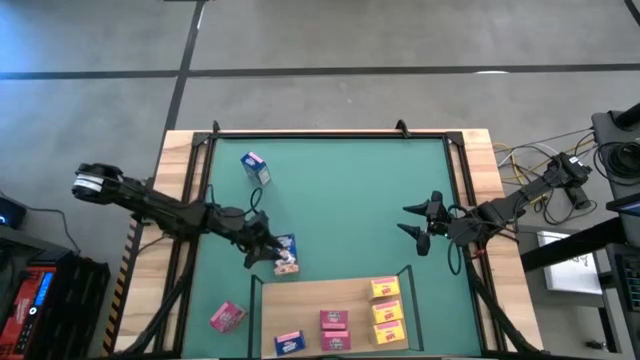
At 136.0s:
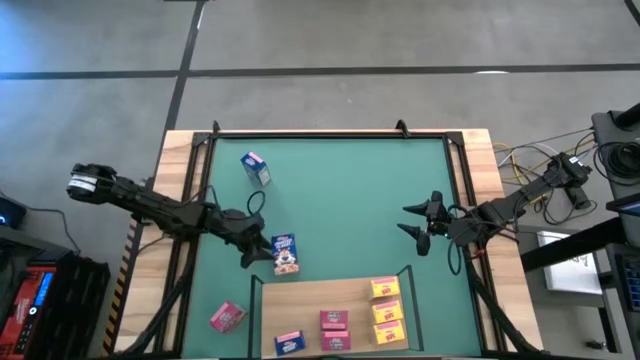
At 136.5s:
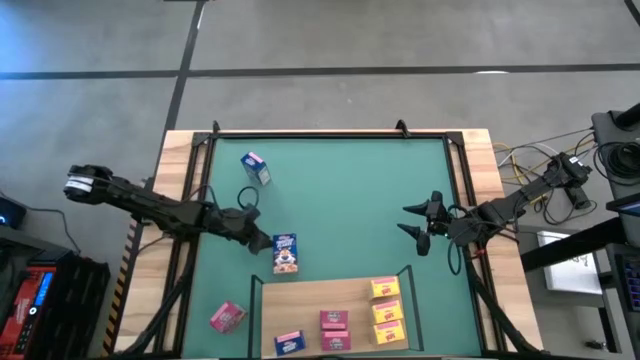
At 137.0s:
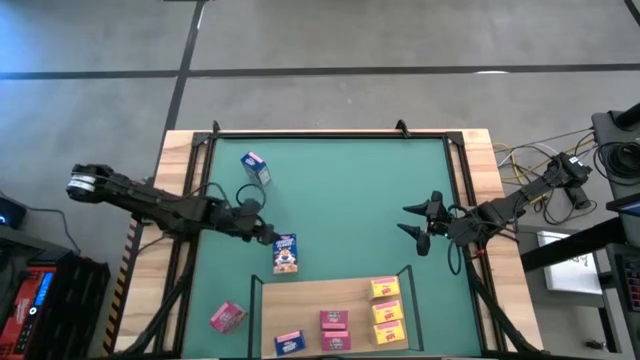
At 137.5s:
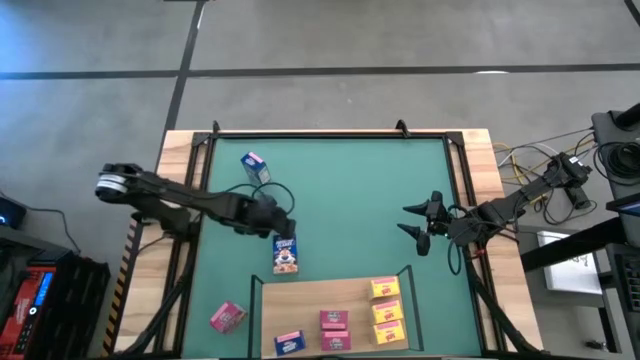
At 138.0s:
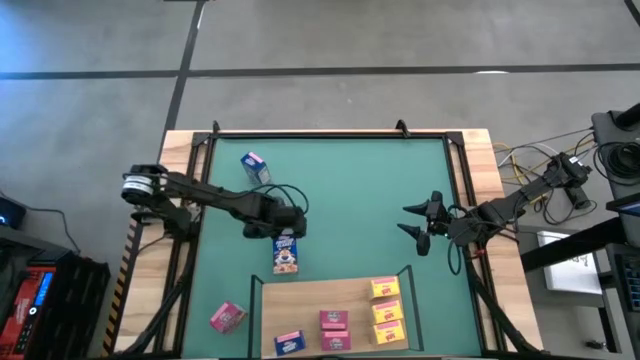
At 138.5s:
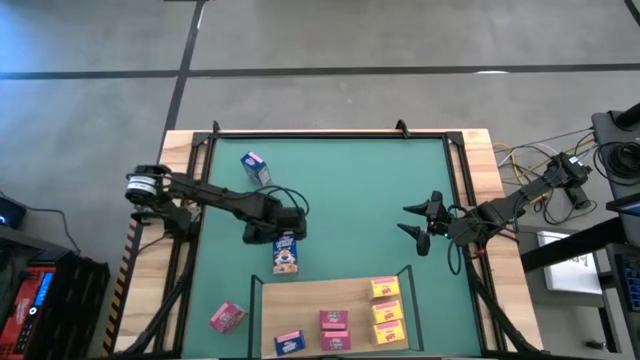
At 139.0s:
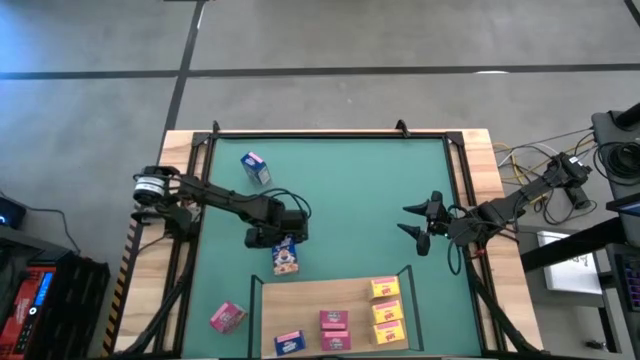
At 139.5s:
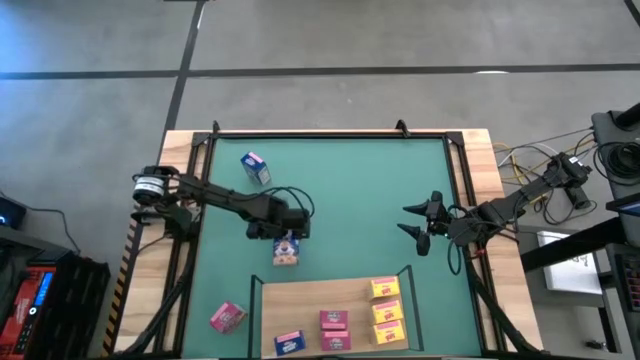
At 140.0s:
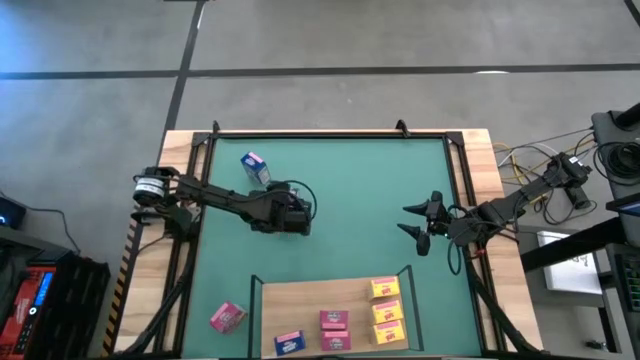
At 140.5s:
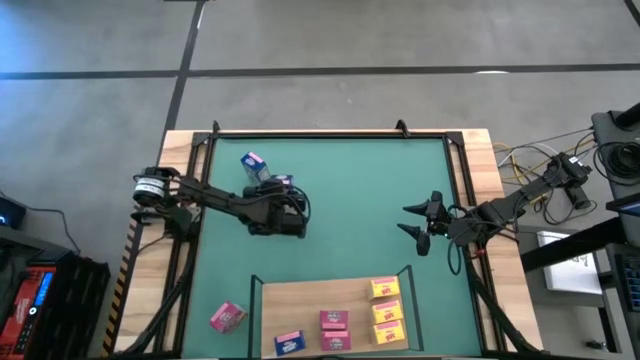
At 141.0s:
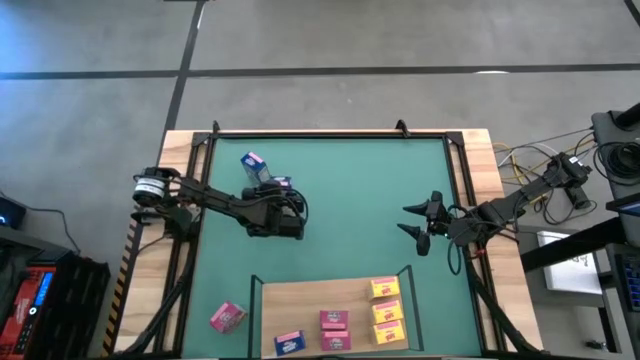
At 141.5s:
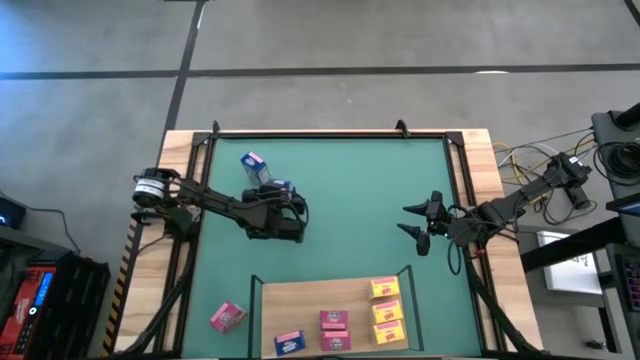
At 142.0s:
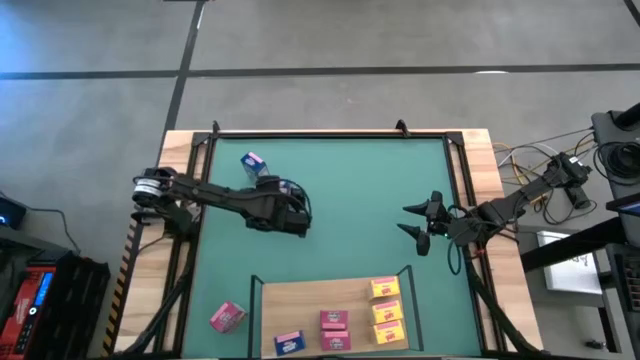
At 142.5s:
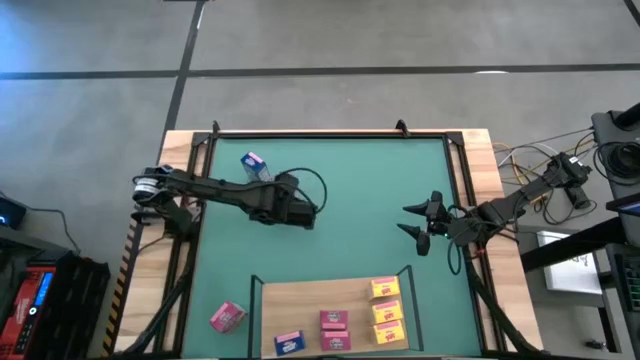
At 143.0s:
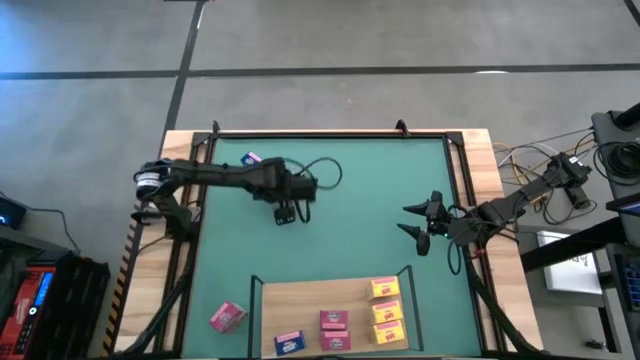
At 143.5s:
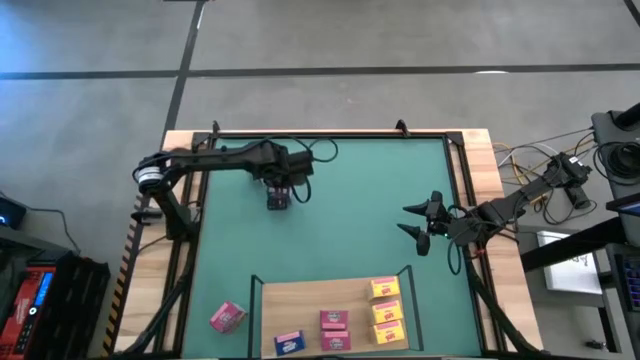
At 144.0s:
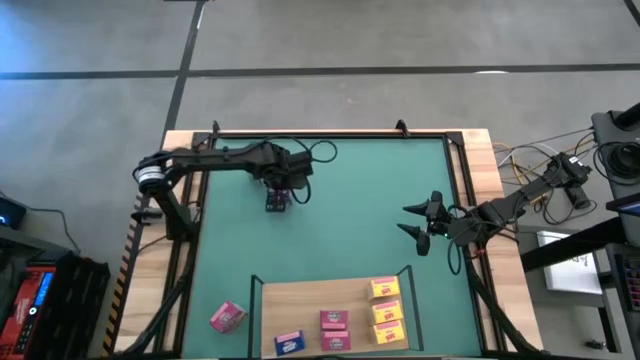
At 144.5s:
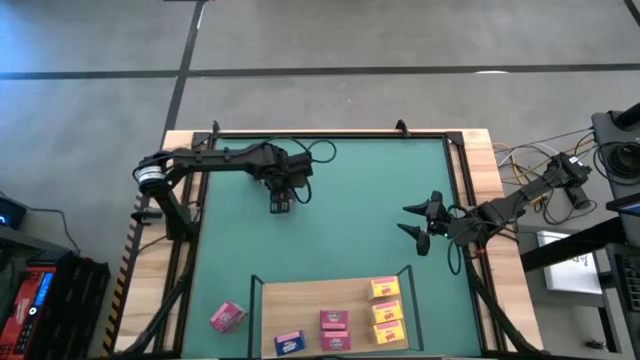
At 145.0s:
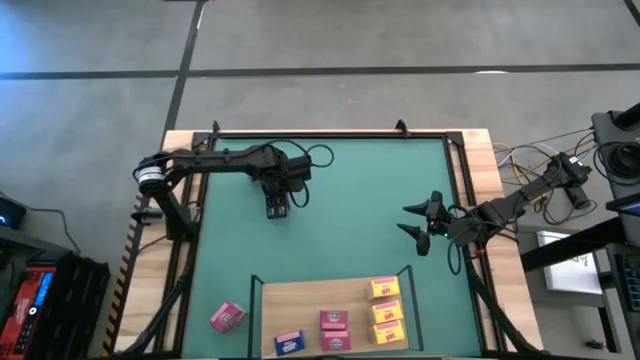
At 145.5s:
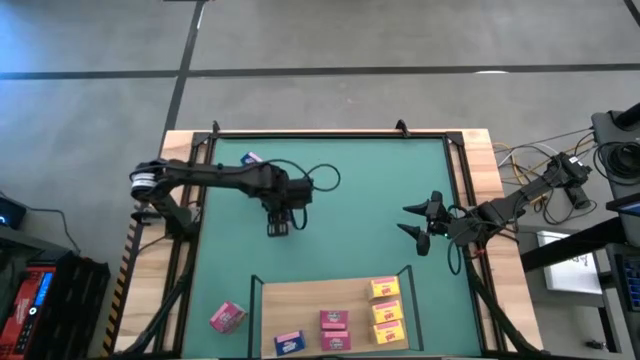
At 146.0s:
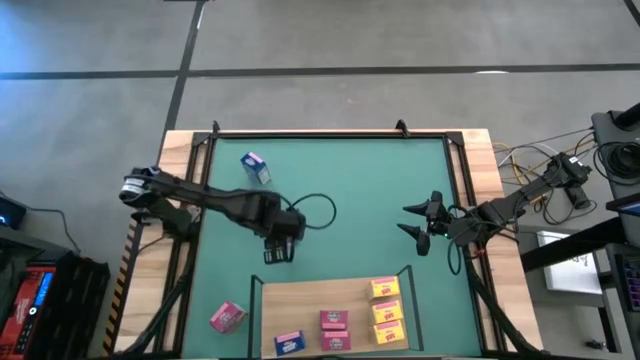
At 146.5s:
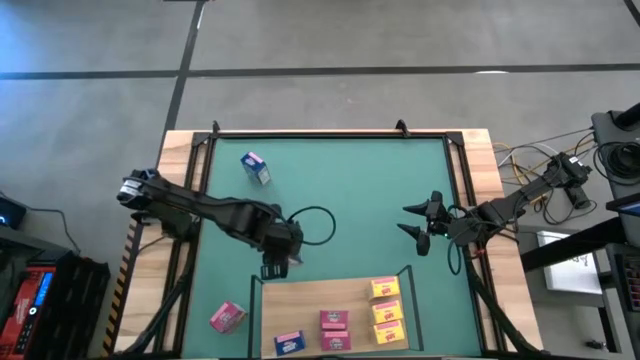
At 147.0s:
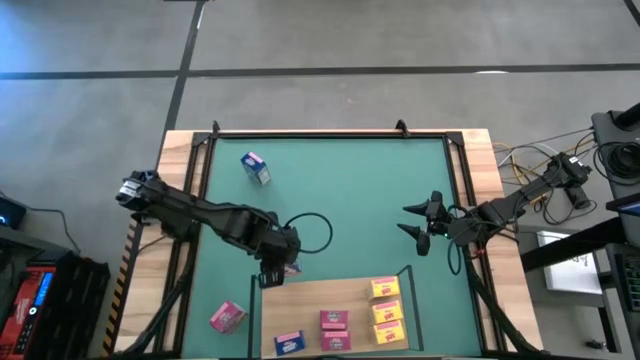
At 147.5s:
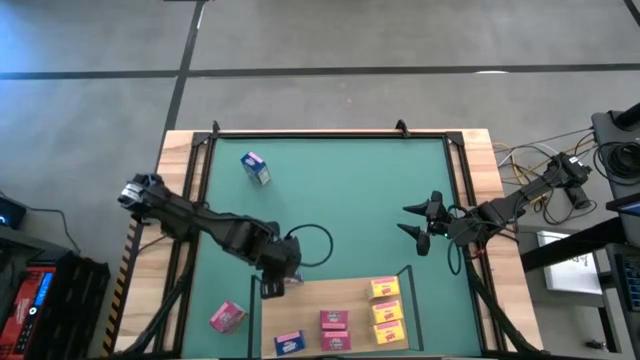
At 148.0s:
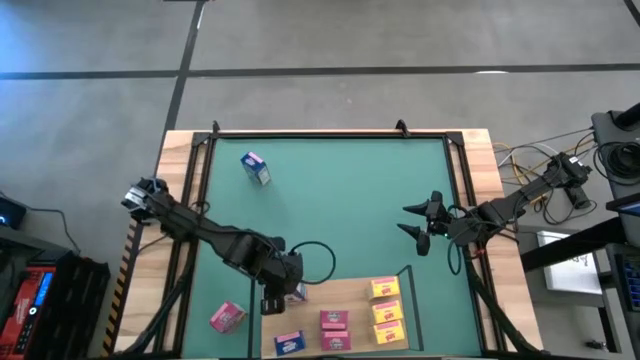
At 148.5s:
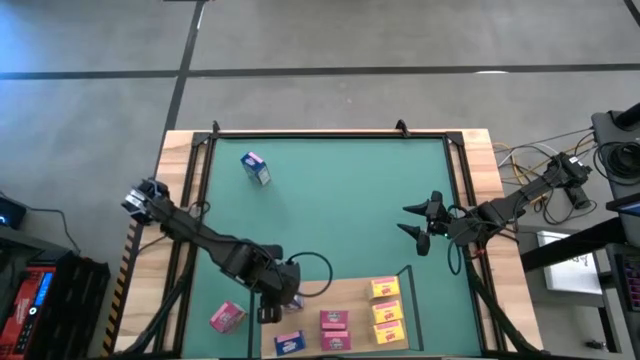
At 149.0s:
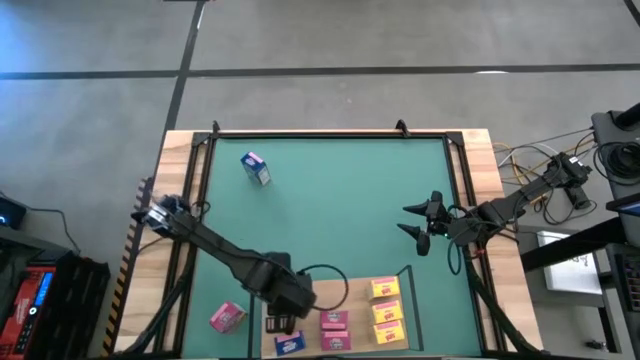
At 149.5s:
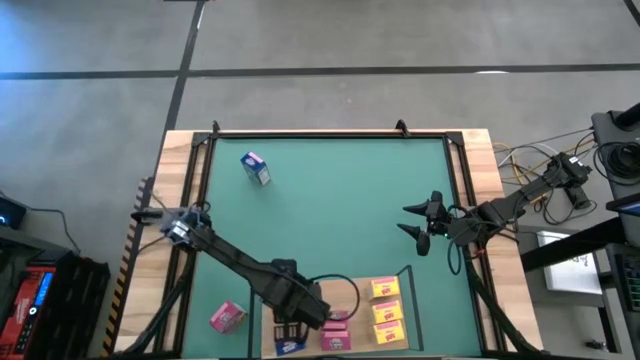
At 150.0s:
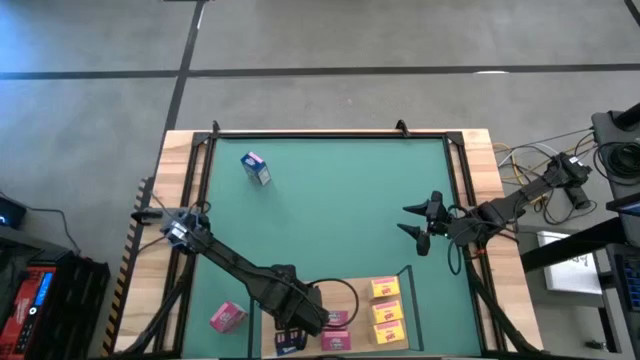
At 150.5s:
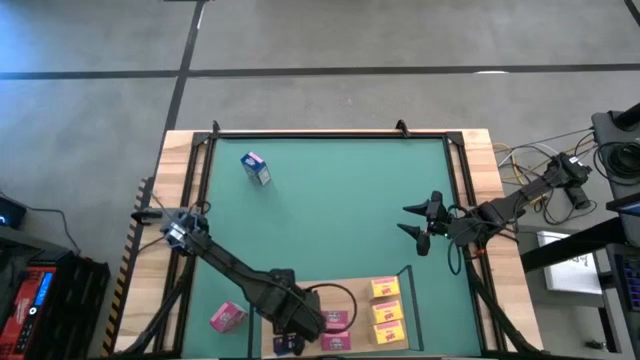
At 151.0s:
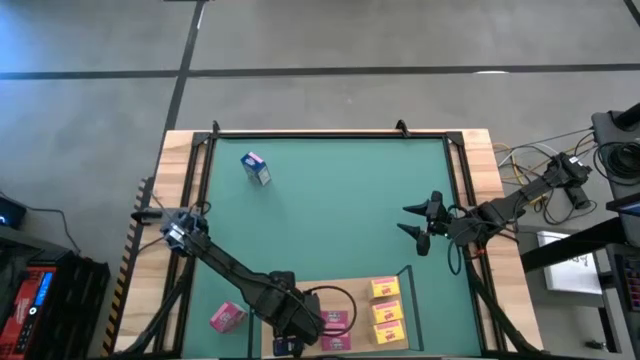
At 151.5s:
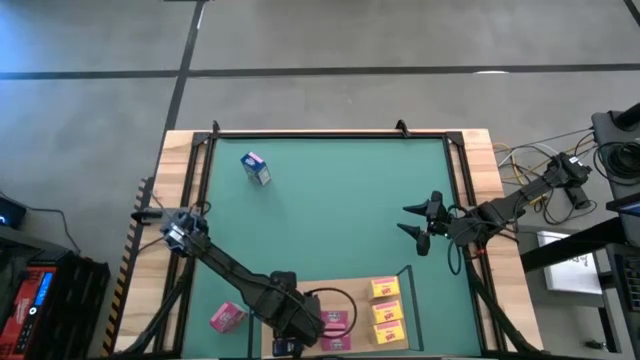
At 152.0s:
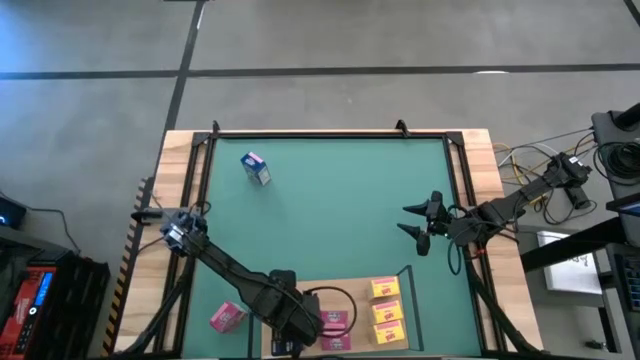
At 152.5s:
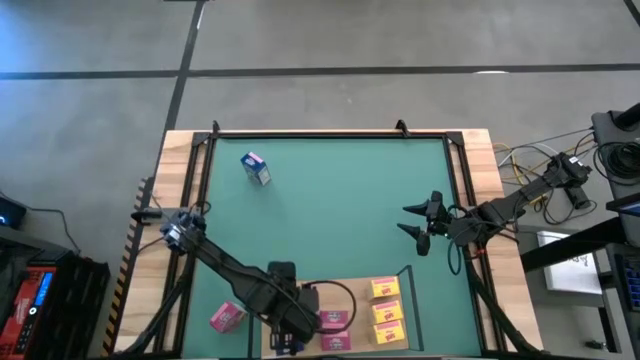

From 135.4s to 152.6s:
Task: Stack cereal on shelf
Put the bottom blue cereal box on the shelf aligned with the other blue cereal box

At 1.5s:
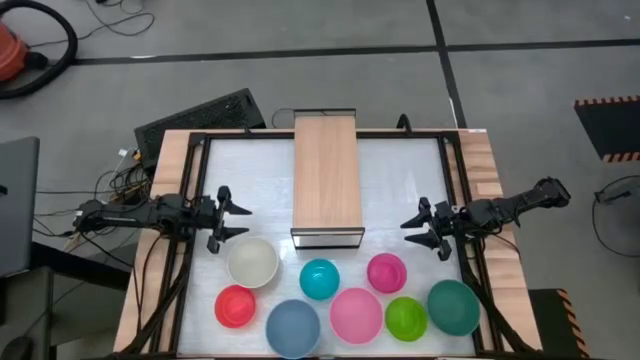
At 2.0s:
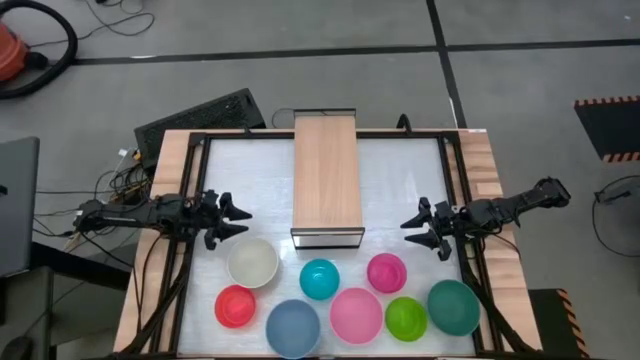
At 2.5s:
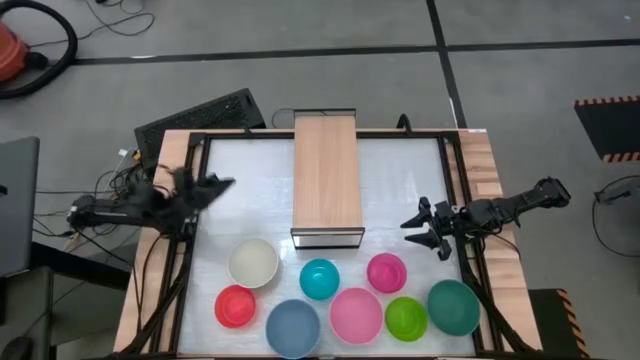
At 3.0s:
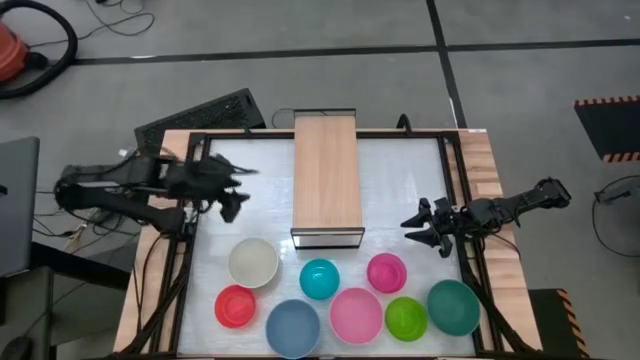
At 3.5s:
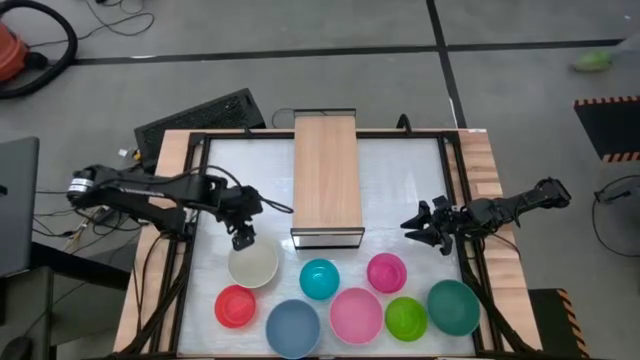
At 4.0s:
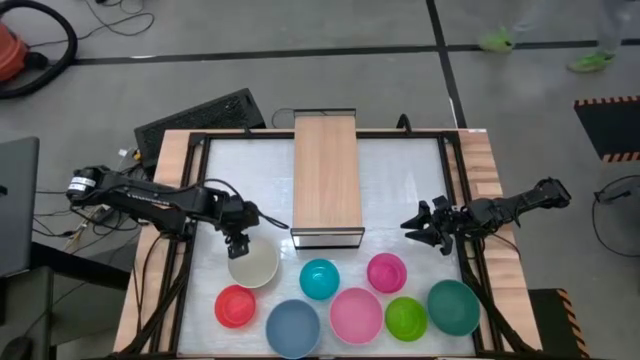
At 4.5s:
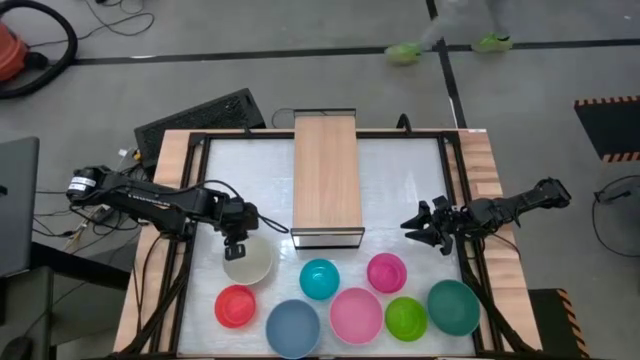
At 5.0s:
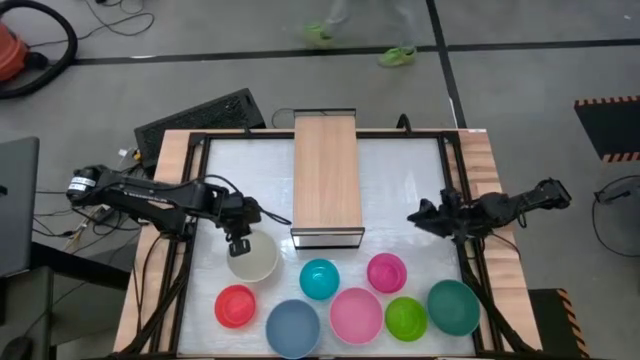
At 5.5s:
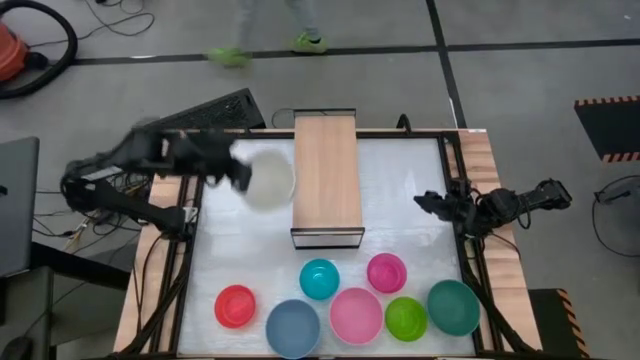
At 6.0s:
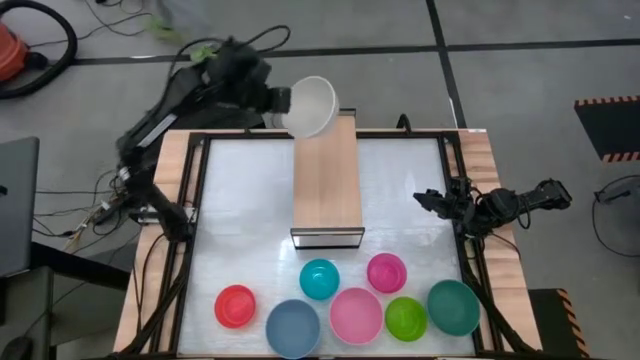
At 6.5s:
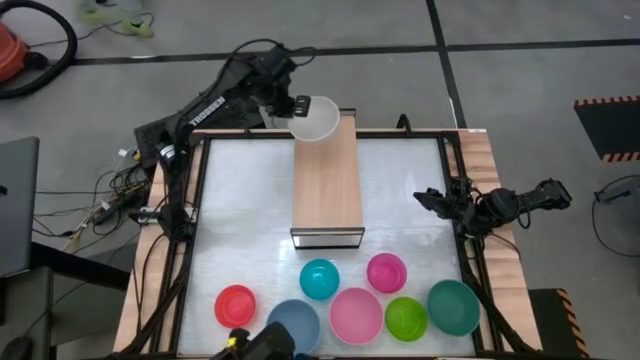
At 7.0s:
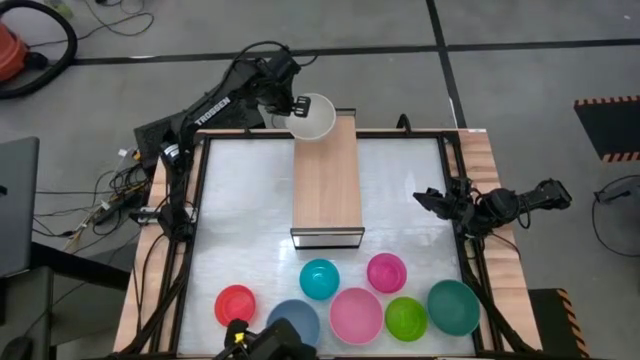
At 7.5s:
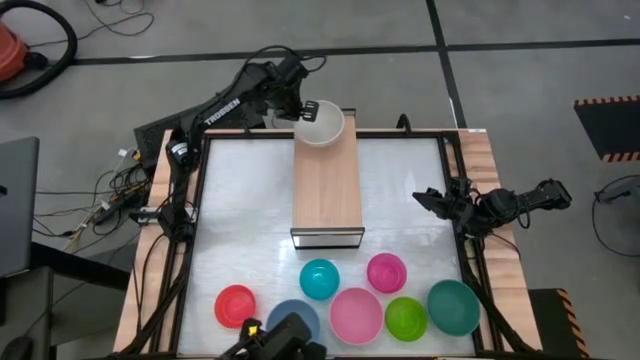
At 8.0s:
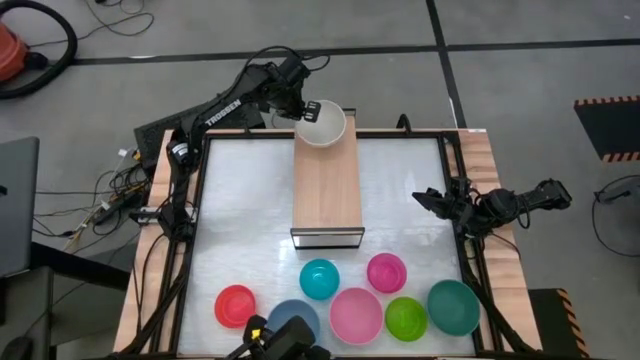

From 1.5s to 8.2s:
Task: Place and stack bowls onto a shelf
Put the white bowl on the shelf
